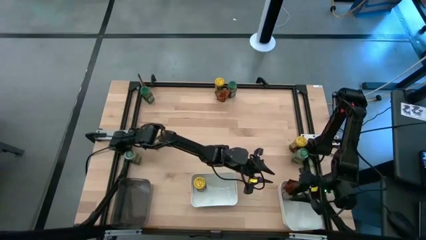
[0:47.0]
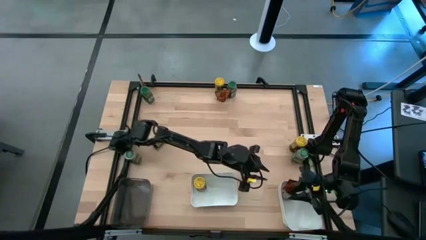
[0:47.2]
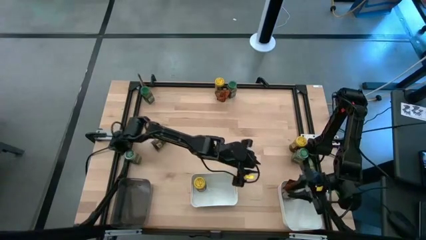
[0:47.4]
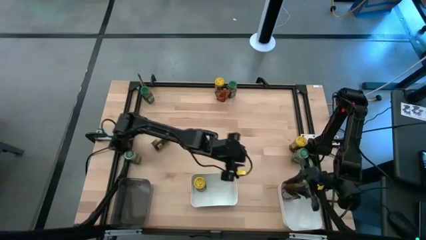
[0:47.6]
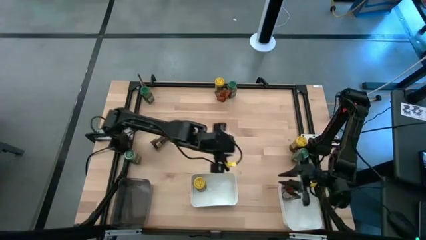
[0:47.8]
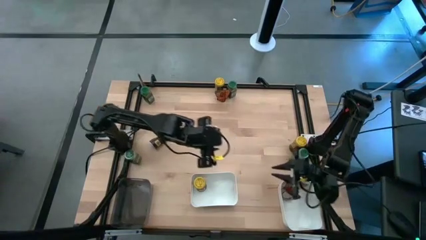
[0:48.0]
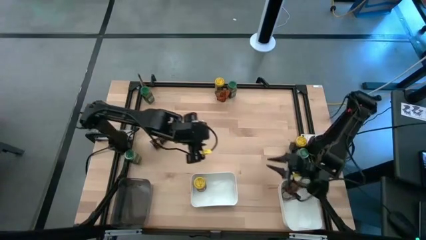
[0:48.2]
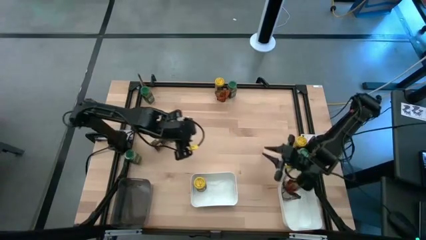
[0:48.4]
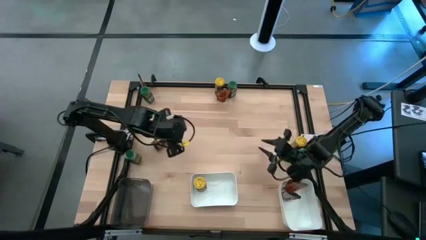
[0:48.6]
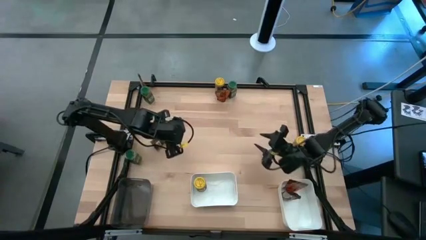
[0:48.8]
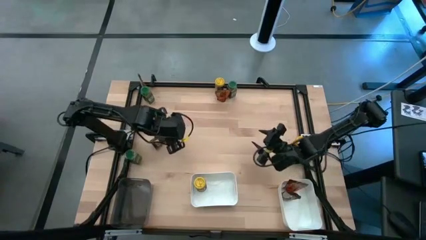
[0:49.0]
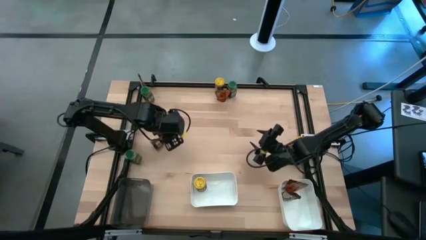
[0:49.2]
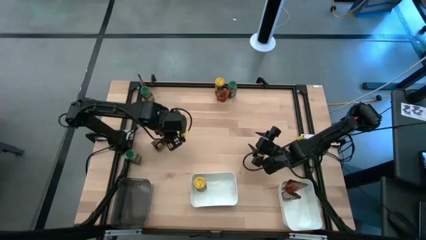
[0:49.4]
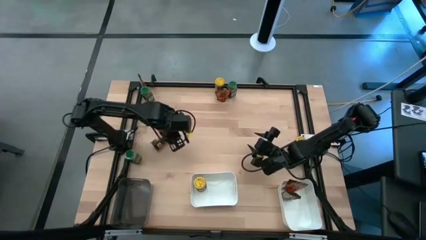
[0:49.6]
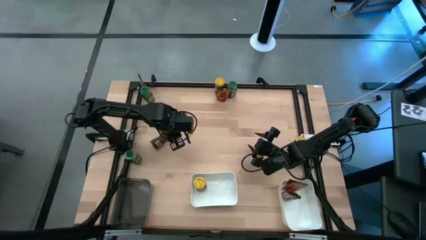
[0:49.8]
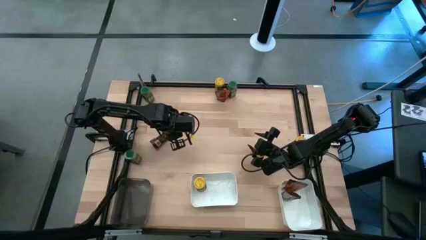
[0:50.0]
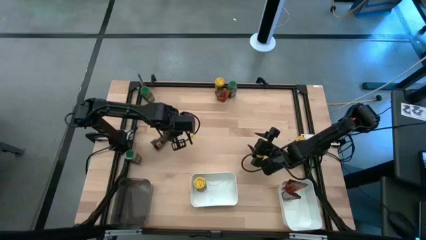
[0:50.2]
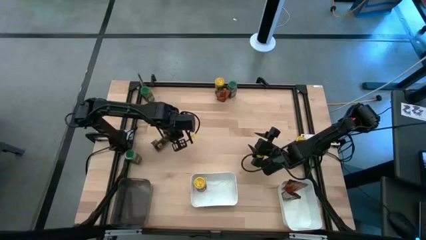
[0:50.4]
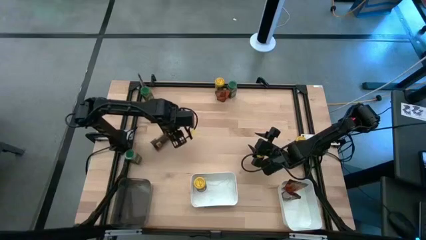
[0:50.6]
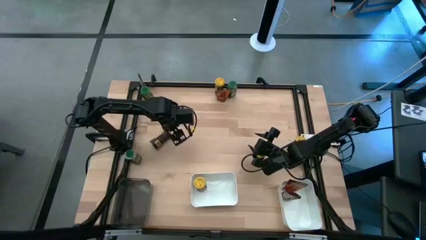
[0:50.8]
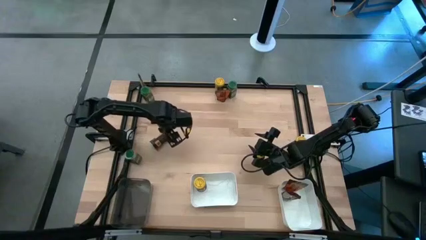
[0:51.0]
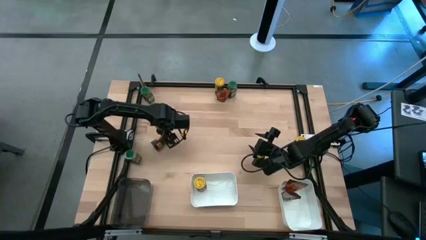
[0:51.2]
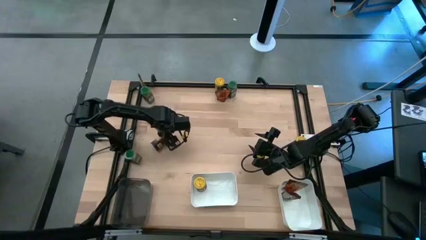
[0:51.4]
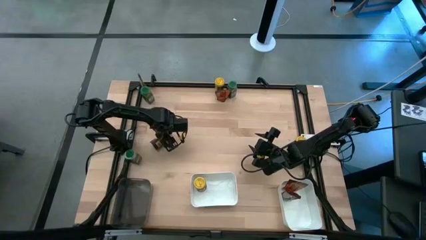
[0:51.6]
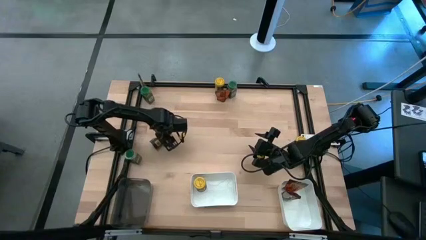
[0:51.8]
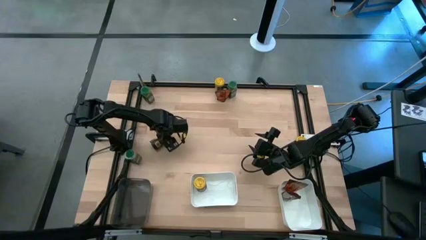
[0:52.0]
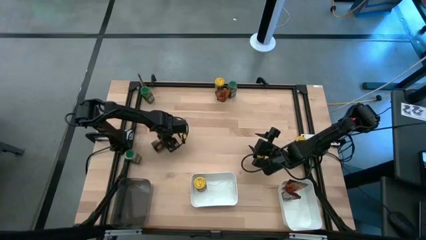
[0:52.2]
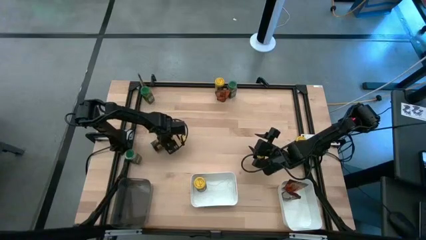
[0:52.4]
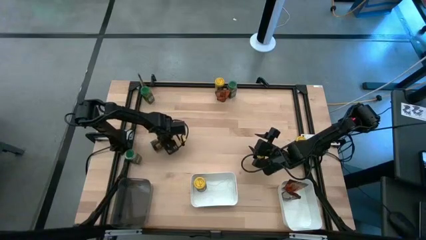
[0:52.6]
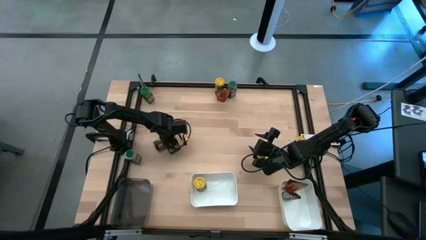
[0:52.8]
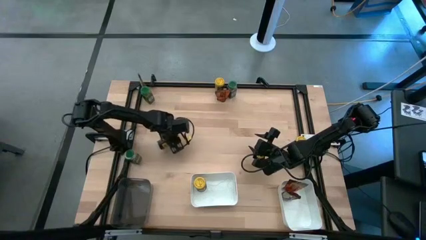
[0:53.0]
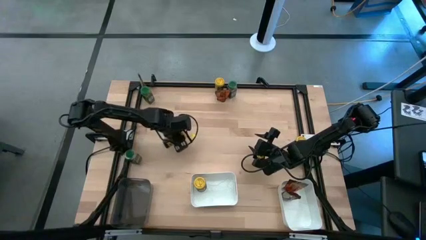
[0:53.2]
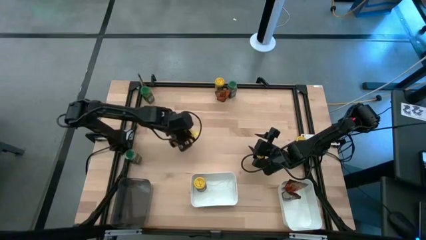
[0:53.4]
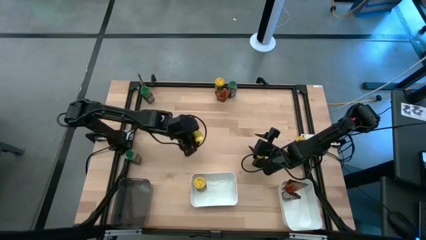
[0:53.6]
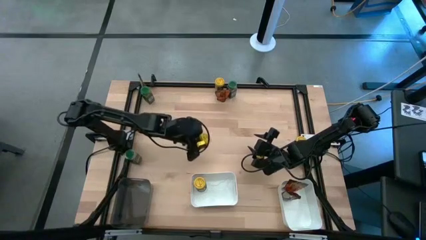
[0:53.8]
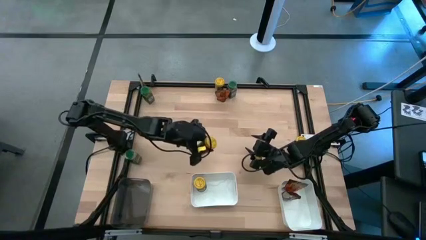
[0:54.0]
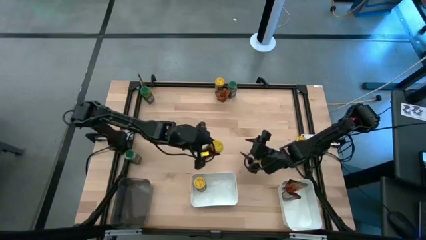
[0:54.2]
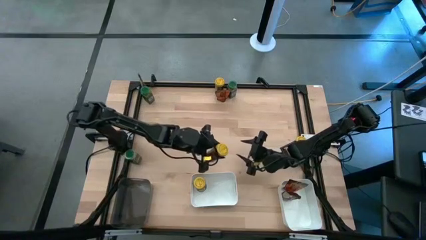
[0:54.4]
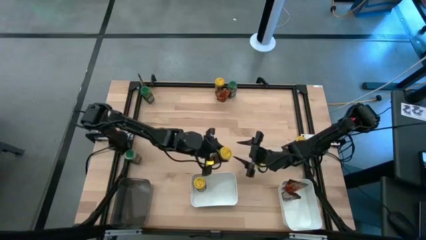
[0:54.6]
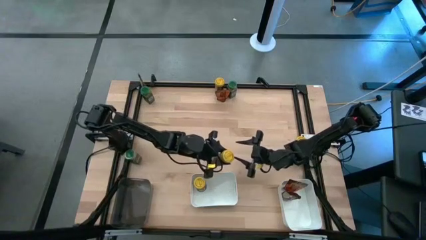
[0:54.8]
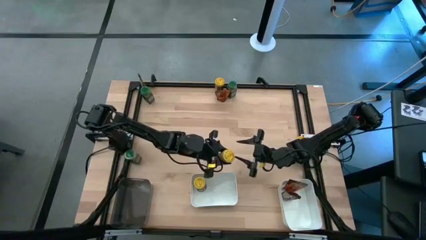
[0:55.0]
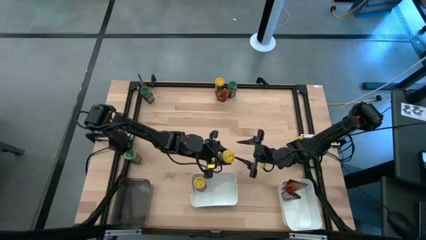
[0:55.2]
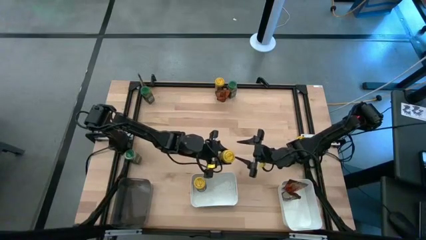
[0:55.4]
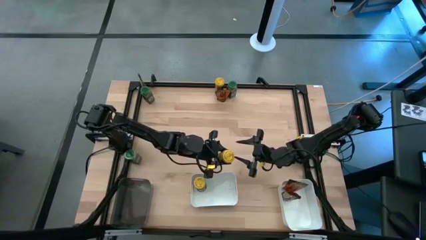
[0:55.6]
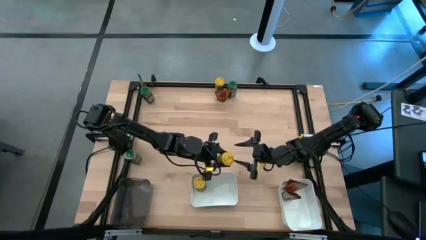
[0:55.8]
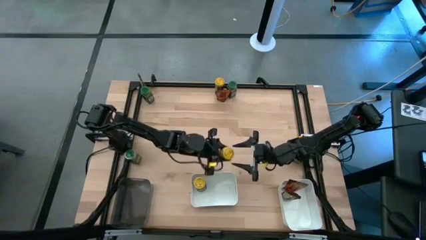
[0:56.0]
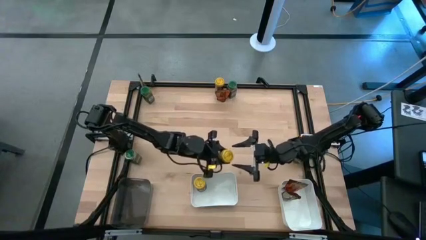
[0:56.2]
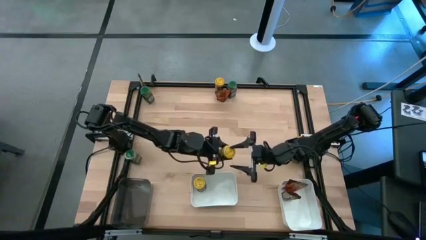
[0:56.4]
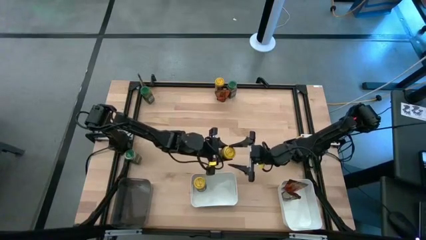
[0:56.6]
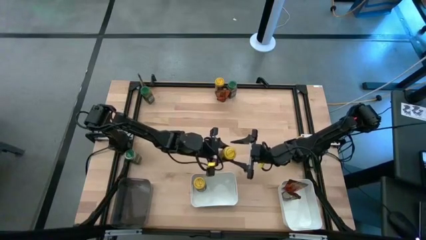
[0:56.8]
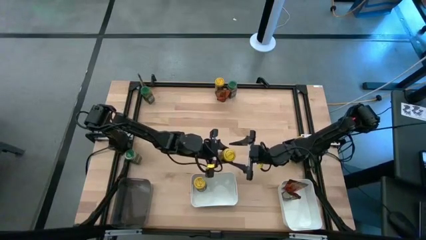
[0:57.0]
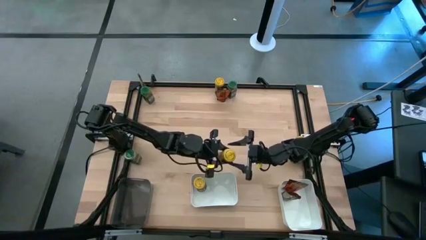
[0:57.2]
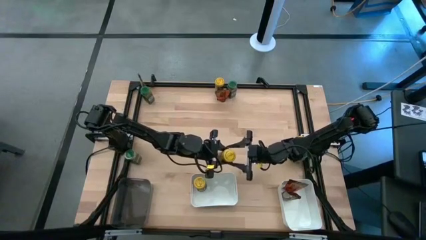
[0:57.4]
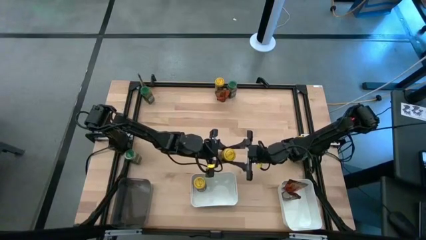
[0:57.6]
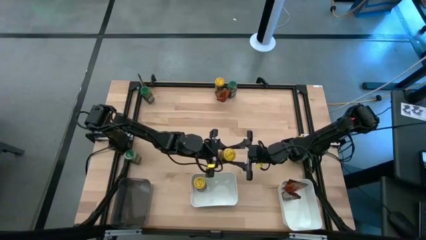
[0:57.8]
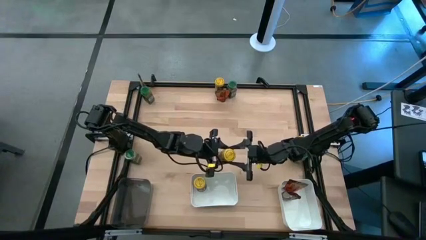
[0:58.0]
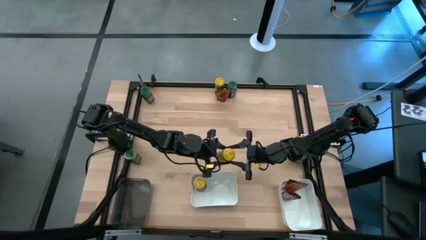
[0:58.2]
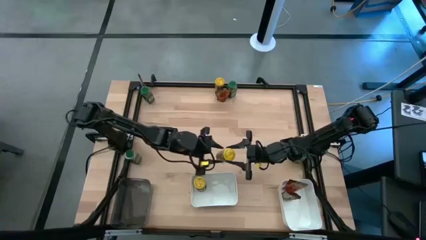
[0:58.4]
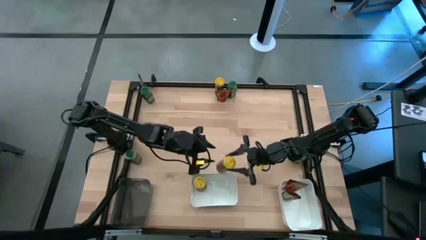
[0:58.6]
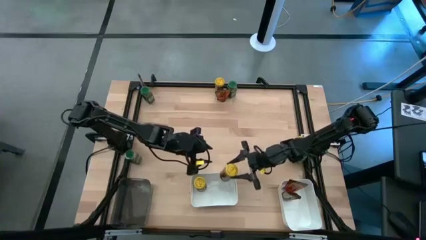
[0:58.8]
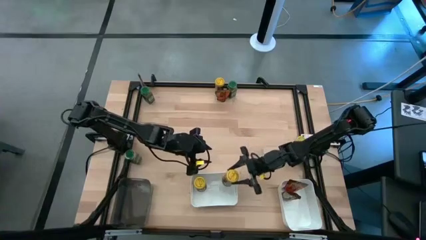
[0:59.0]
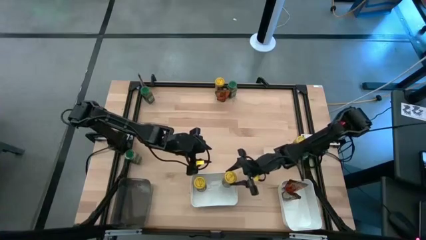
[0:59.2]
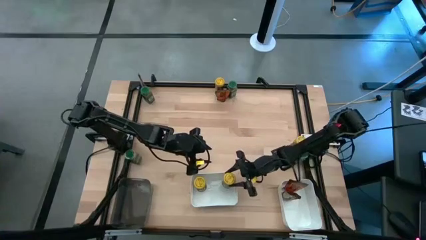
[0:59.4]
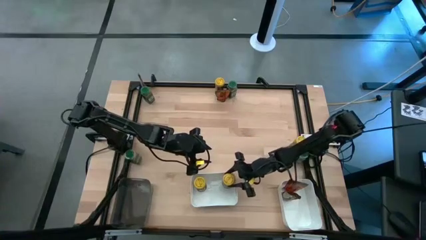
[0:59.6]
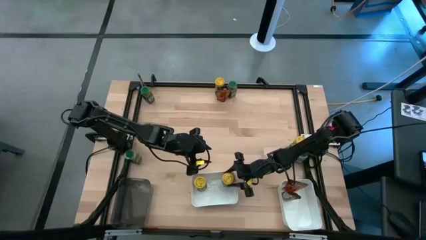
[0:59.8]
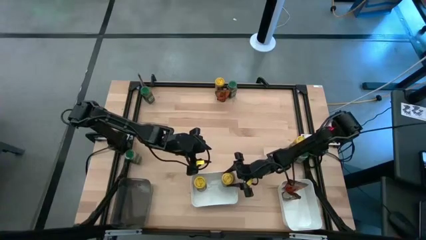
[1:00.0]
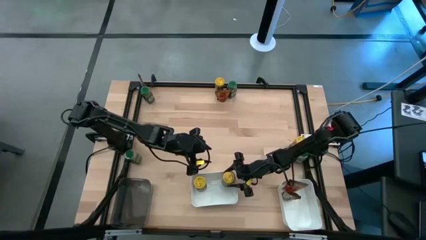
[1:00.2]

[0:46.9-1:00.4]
Task: Sort spices by type
Put the bottom left yellow seasoning bottle into the left white bin

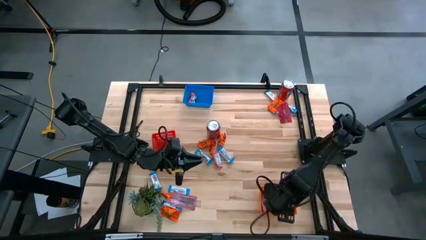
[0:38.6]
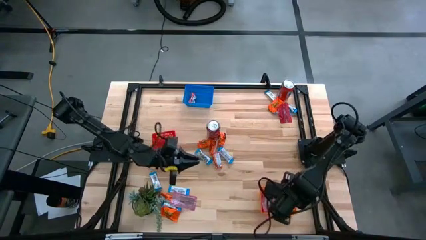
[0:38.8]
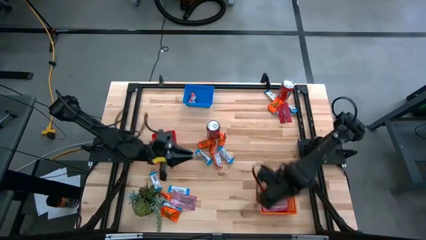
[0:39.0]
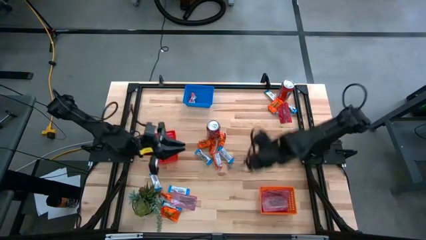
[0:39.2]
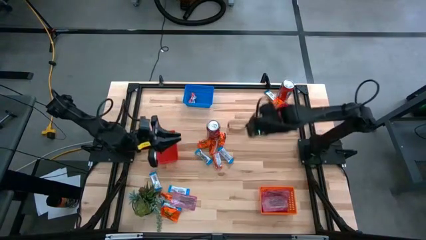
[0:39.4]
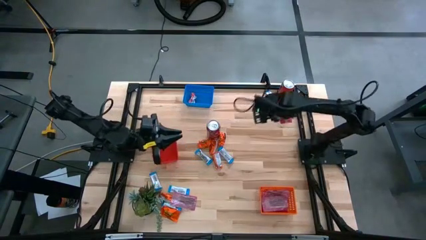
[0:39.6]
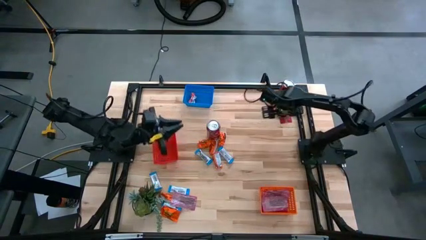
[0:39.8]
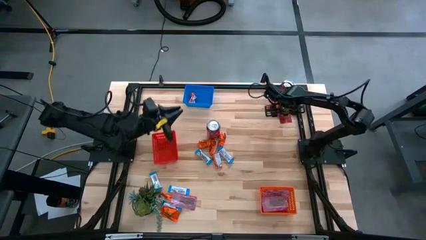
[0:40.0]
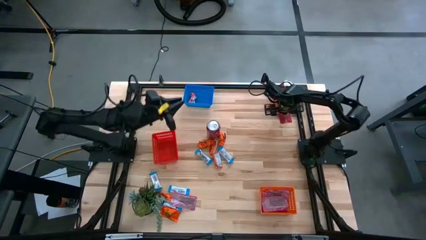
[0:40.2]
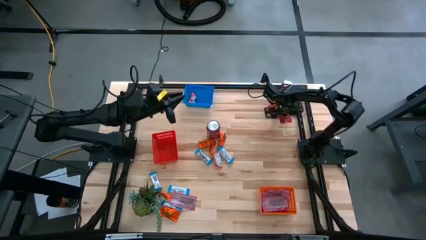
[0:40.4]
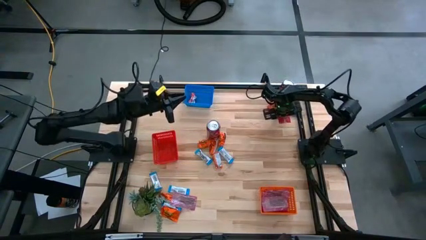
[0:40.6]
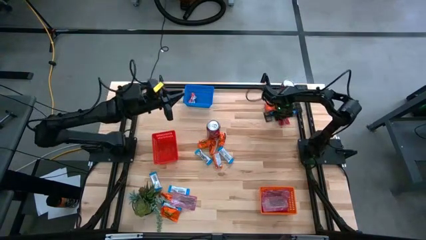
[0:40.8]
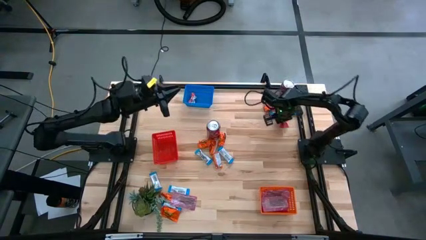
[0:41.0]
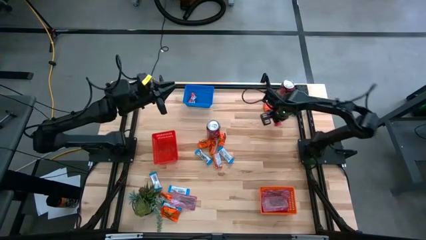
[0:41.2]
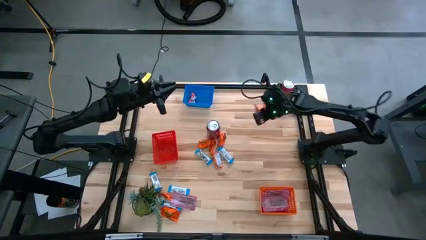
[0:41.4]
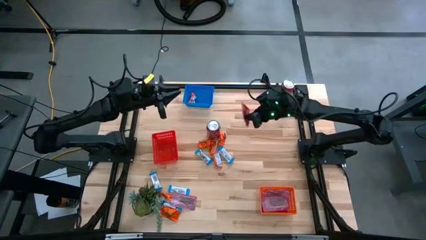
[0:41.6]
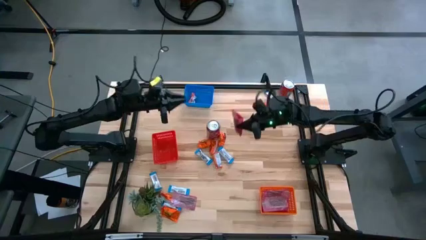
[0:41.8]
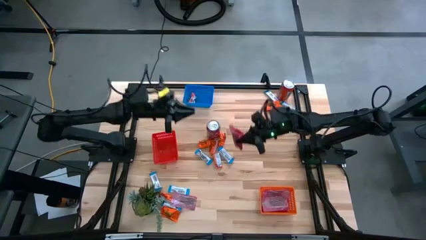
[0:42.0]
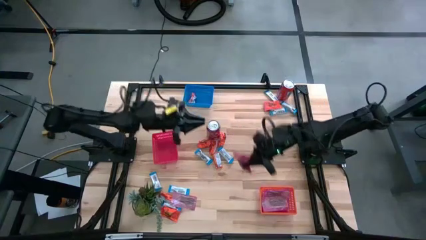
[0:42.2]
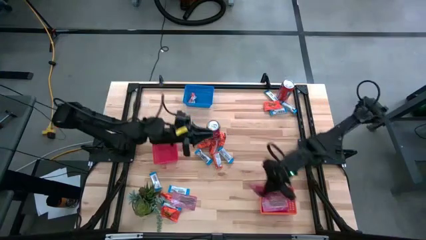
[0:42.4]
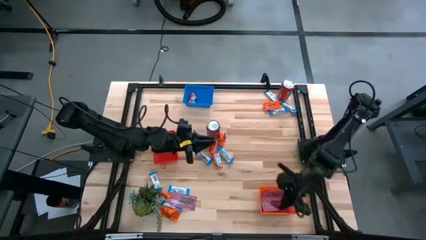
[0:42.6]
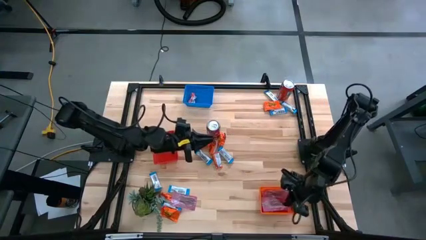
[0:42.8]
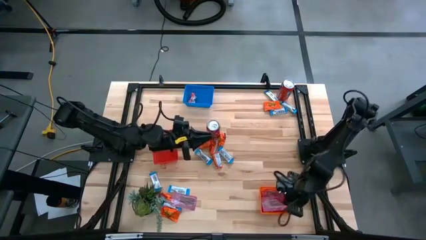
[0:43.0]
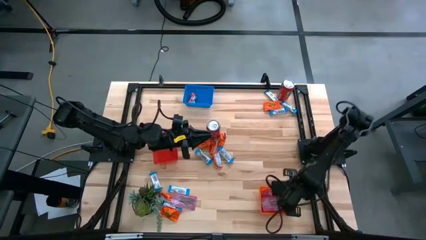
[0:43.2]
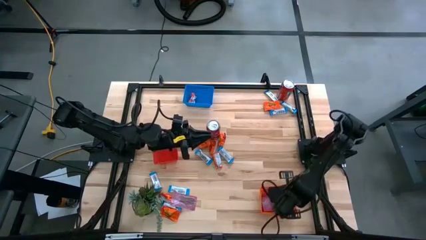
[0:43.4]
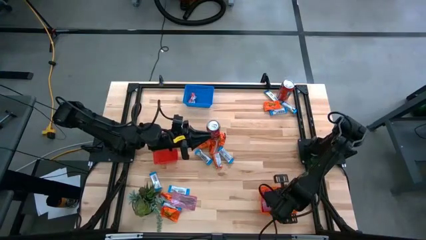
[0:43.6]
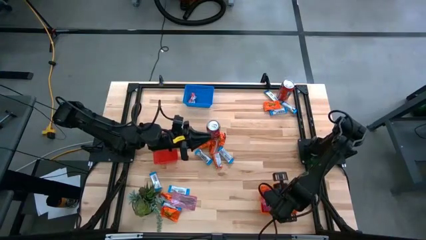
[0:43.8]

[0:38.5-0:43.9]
Task: Sort candy
Put the red candy into the orange bin
